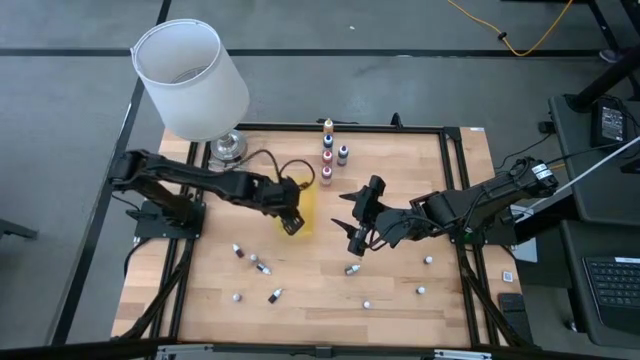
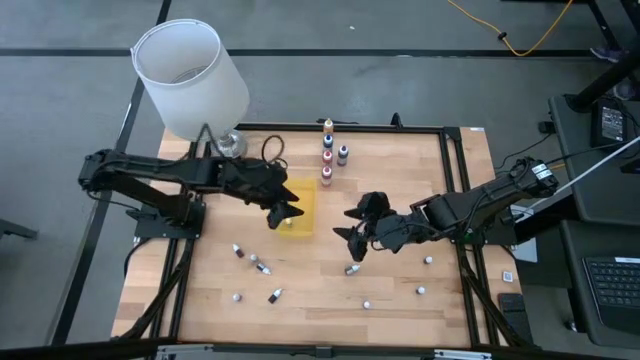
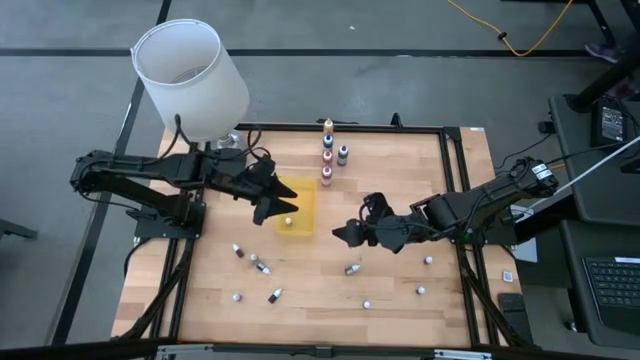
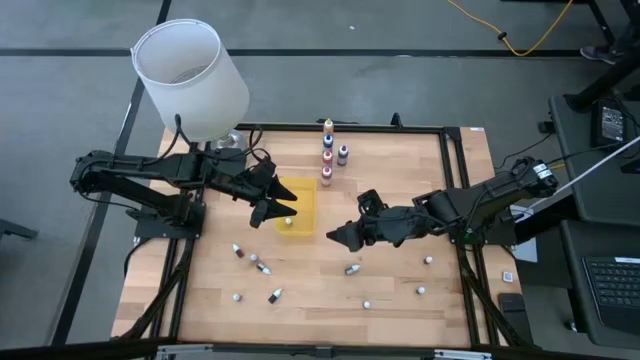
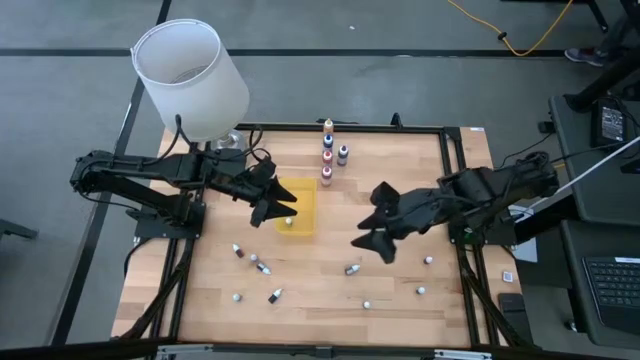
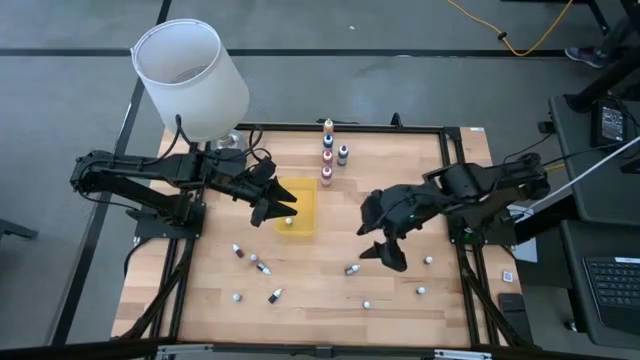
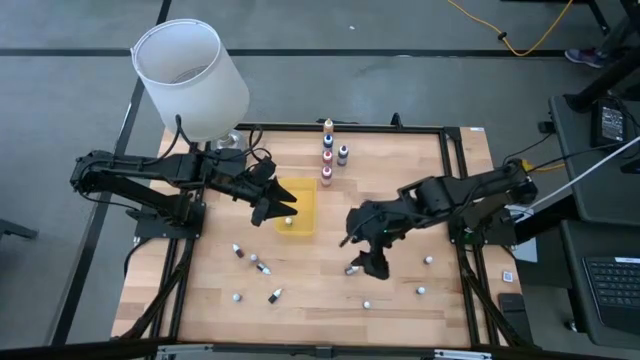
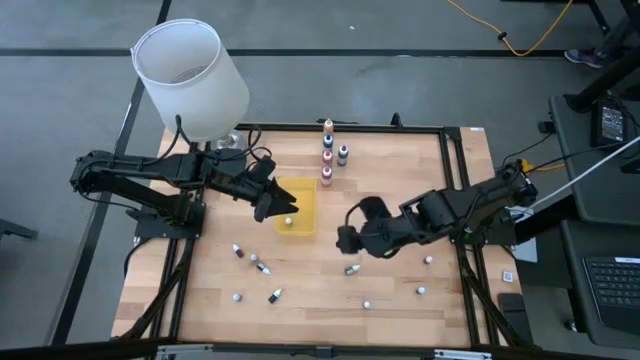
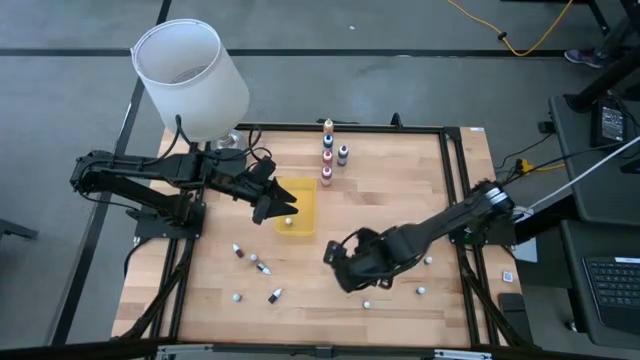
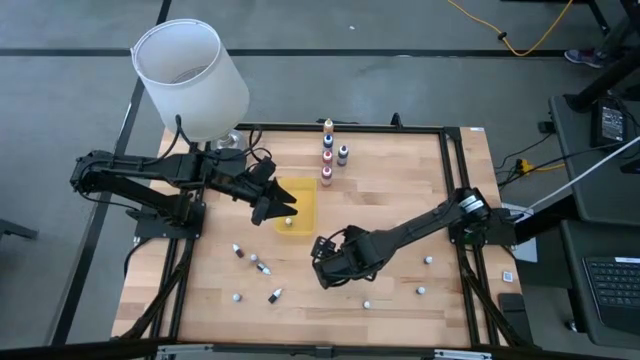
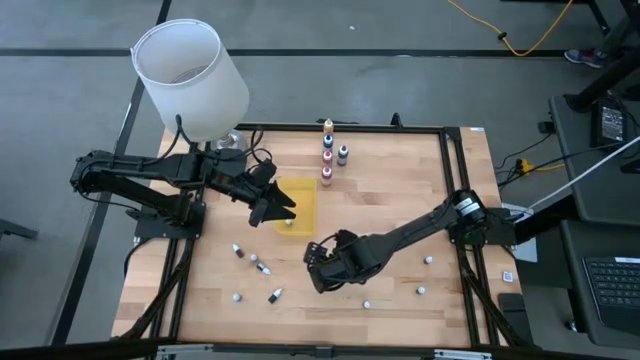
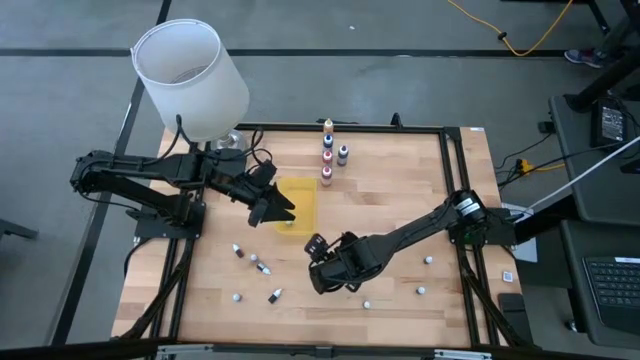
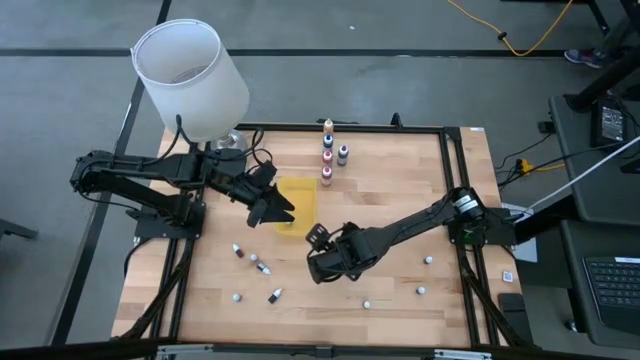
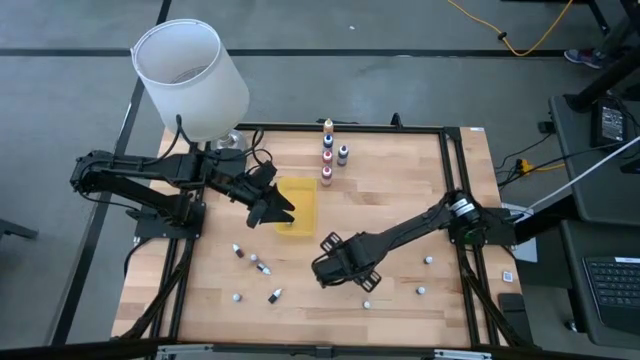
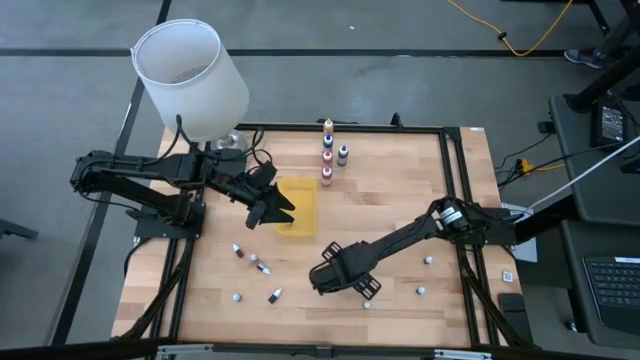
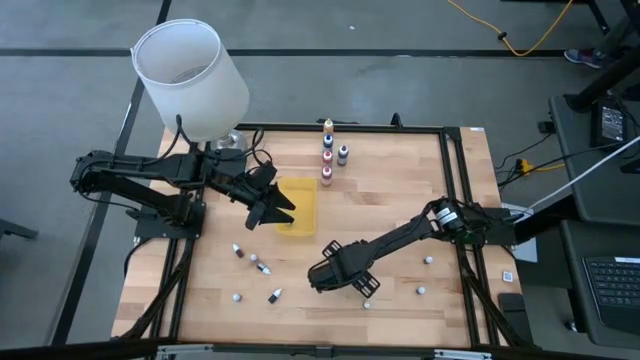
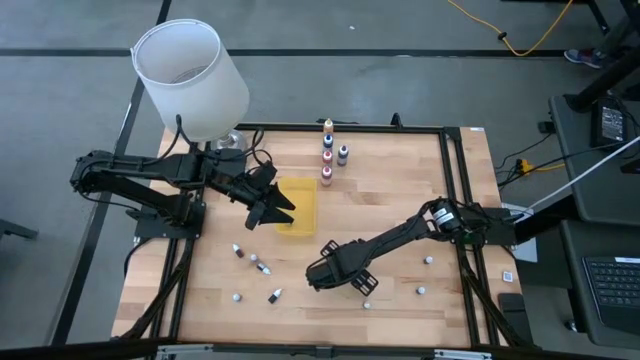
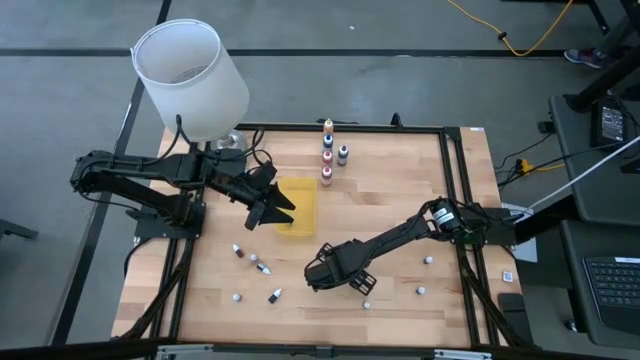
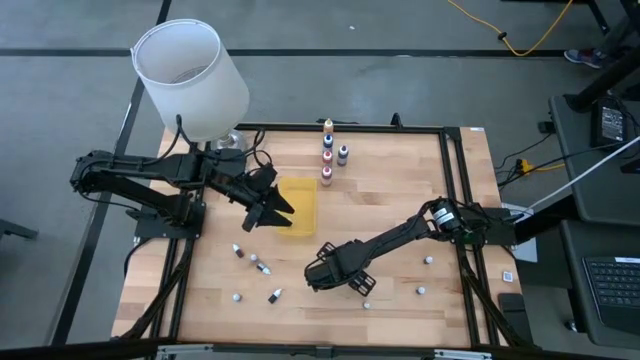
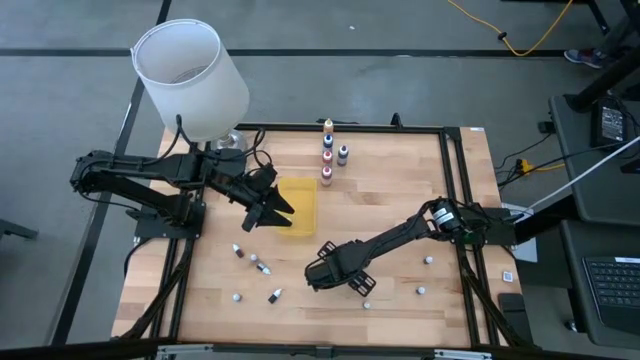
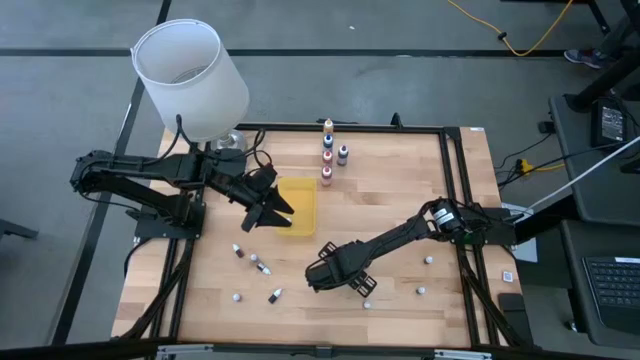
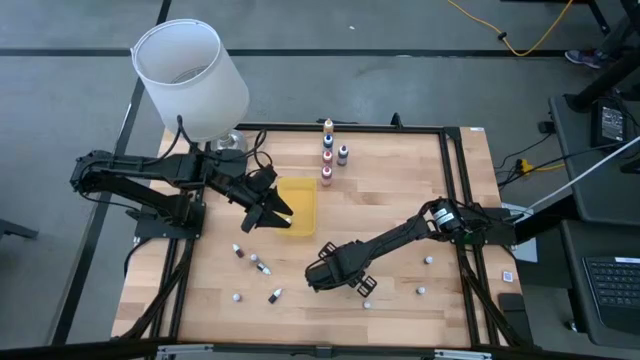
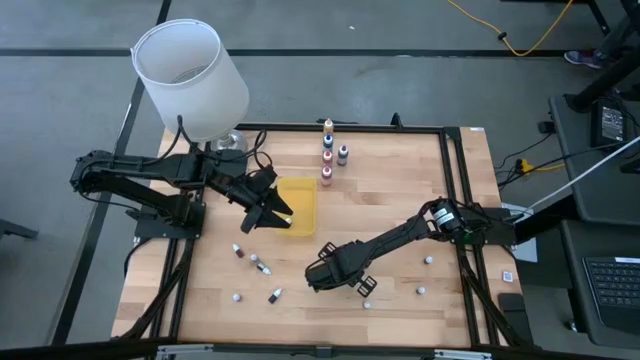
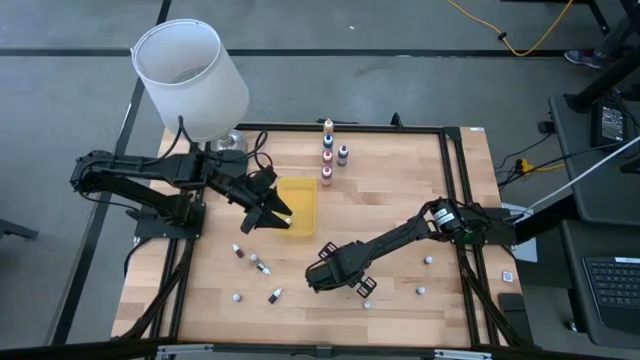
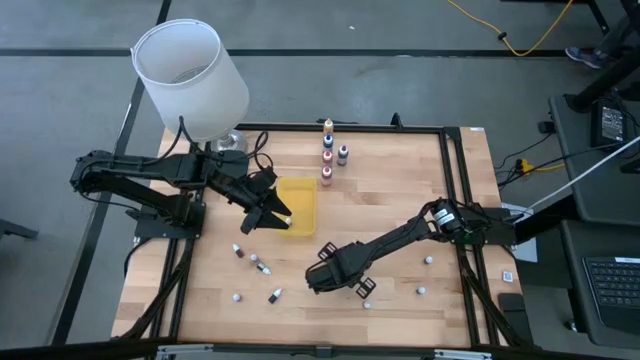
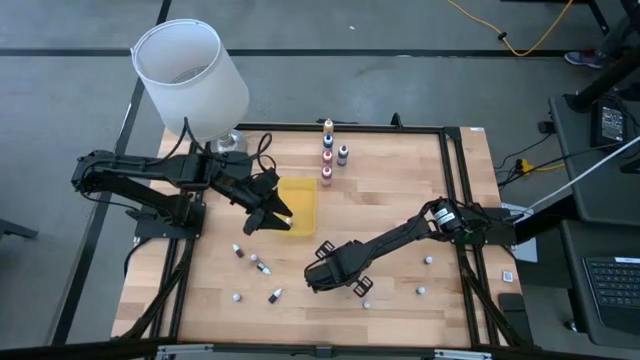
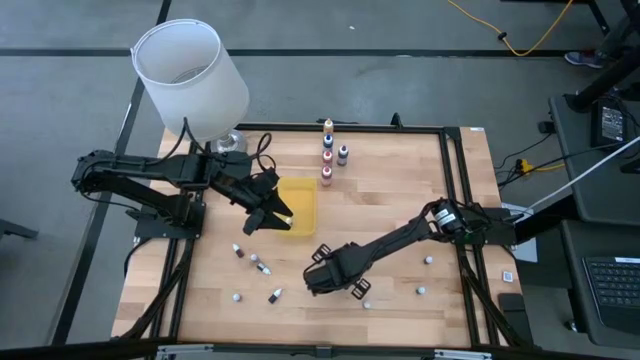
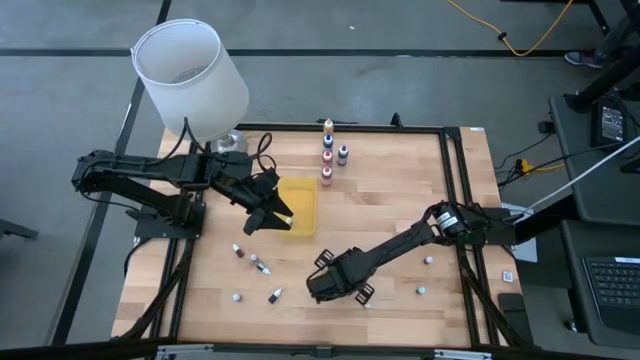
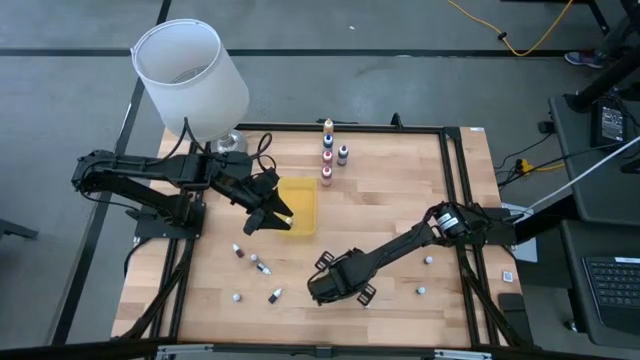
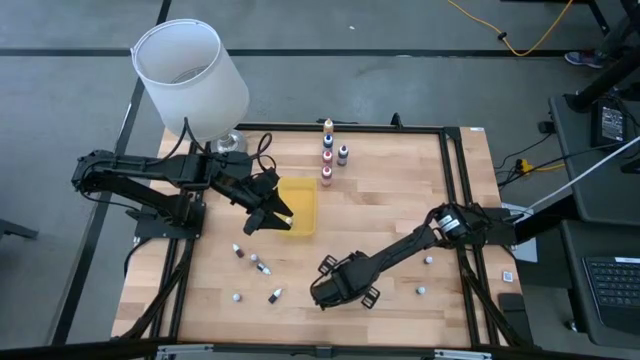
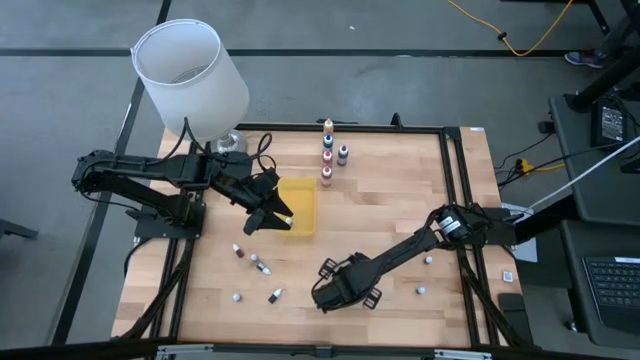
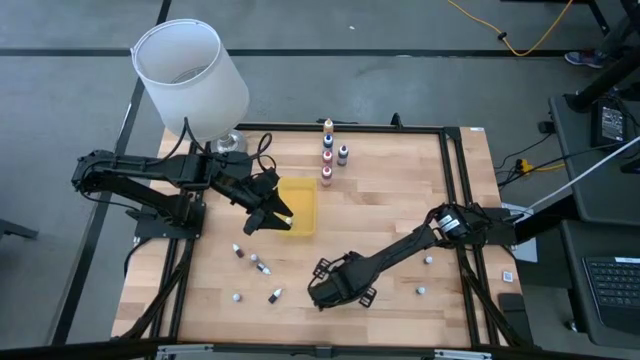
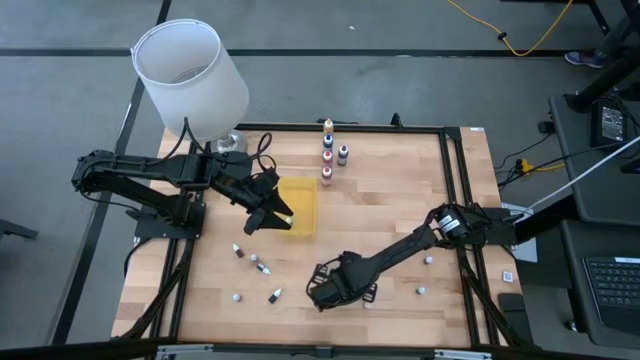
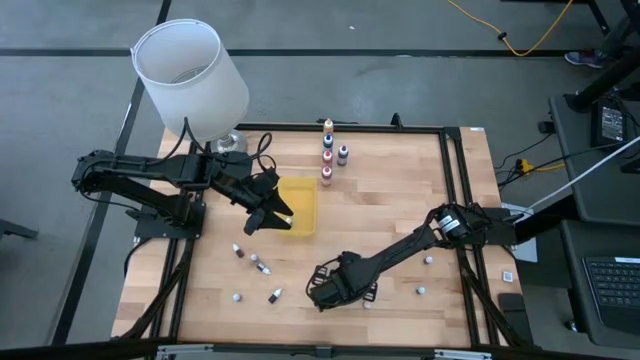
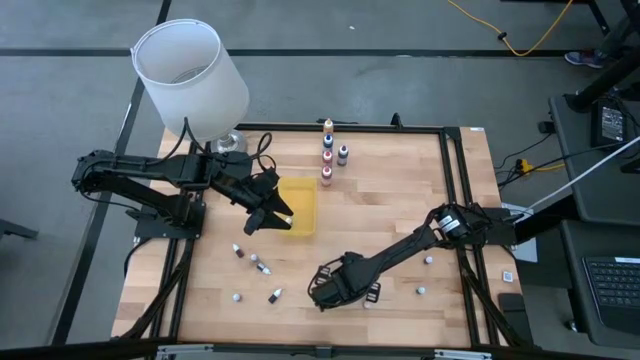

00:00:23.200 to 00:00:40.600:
Task: Pick & Place food coloring
Put the small dark green bottle into the yellow bin
